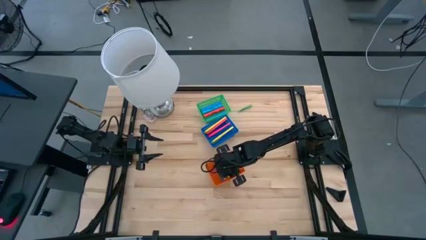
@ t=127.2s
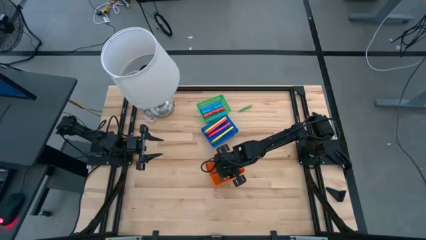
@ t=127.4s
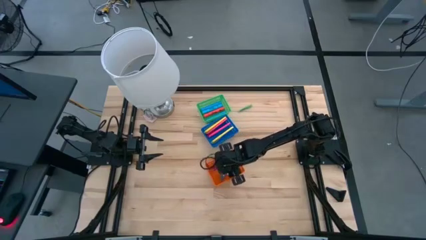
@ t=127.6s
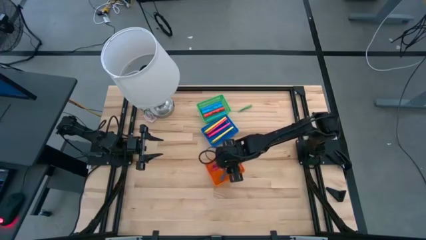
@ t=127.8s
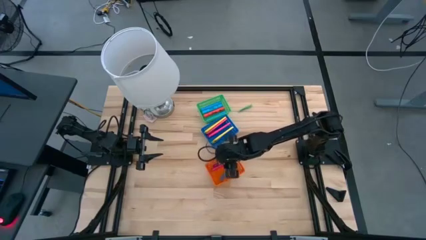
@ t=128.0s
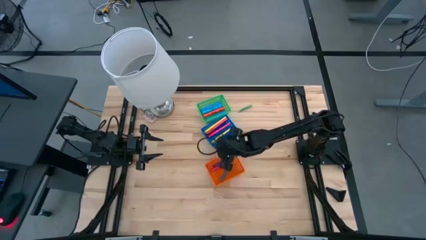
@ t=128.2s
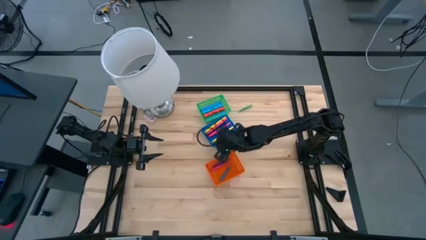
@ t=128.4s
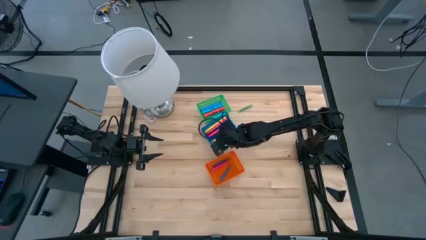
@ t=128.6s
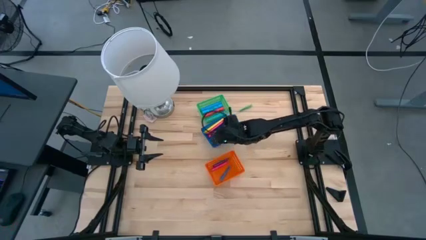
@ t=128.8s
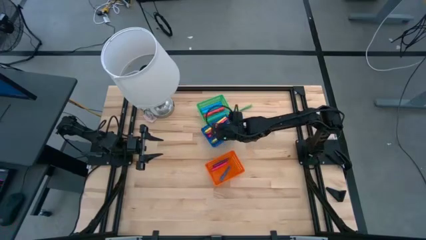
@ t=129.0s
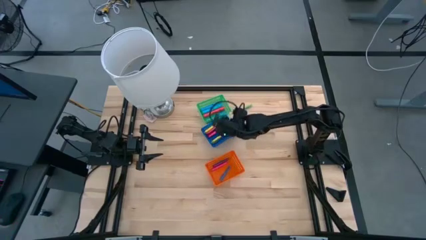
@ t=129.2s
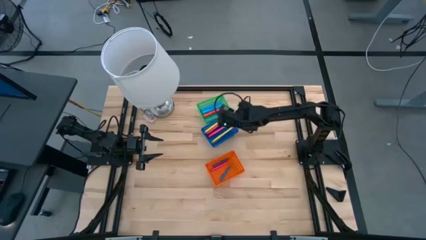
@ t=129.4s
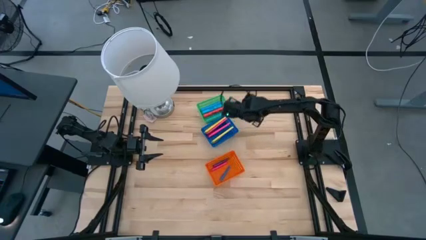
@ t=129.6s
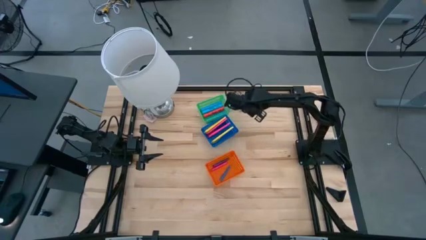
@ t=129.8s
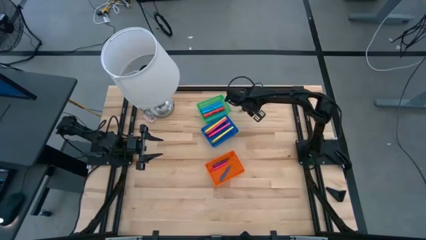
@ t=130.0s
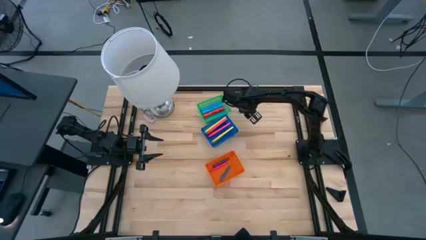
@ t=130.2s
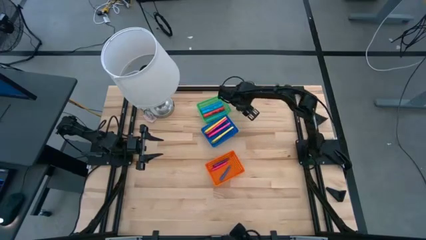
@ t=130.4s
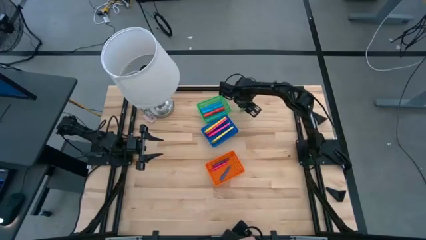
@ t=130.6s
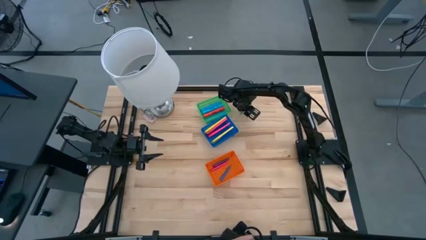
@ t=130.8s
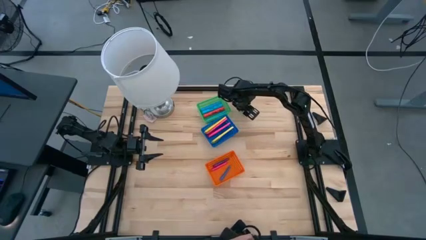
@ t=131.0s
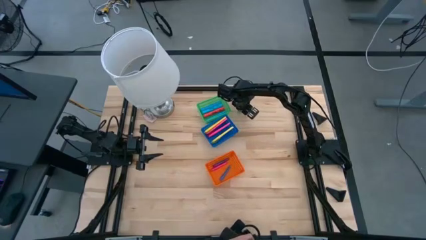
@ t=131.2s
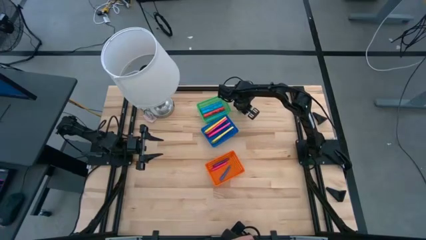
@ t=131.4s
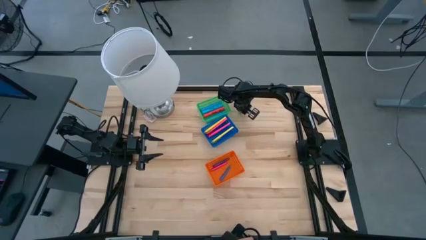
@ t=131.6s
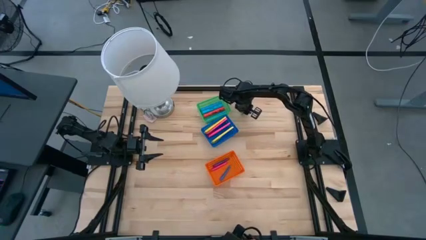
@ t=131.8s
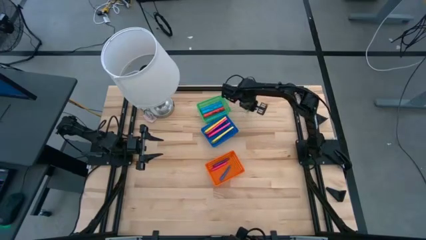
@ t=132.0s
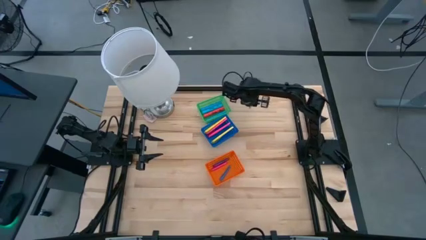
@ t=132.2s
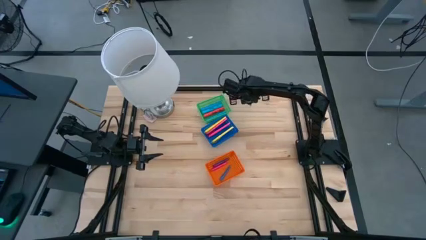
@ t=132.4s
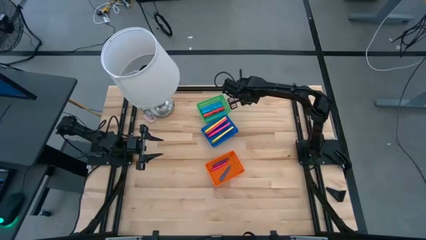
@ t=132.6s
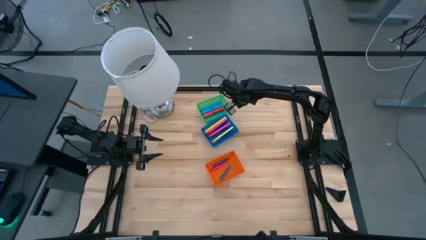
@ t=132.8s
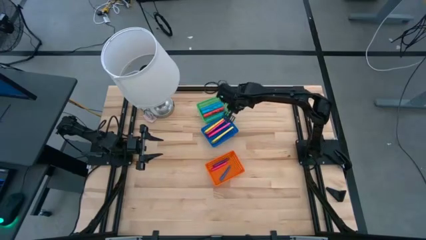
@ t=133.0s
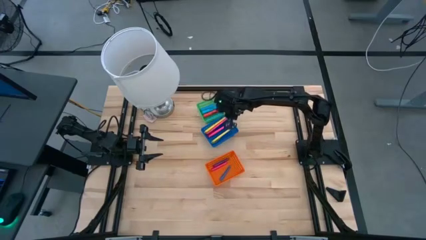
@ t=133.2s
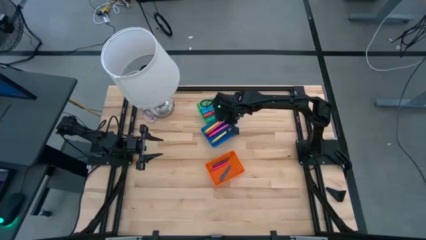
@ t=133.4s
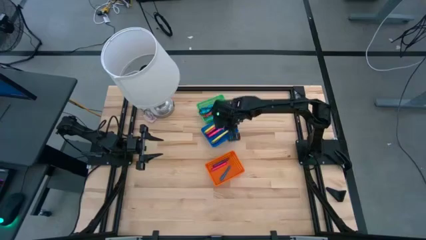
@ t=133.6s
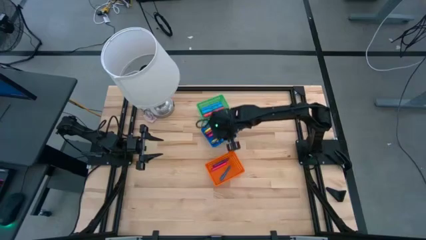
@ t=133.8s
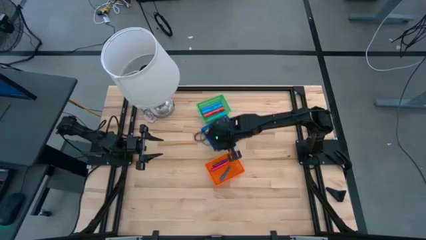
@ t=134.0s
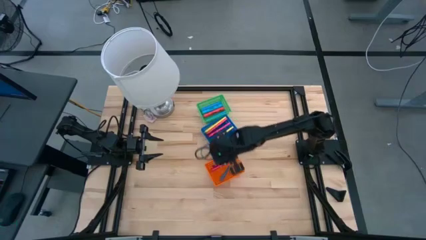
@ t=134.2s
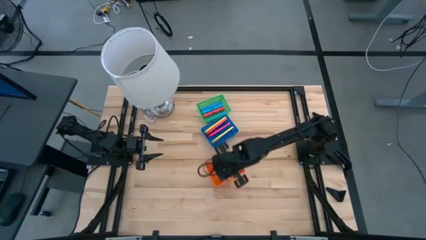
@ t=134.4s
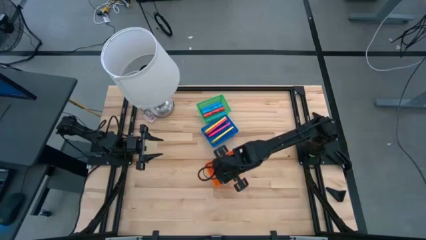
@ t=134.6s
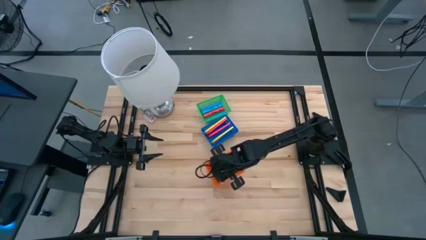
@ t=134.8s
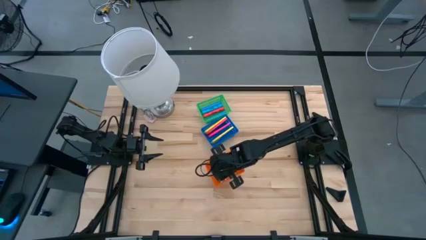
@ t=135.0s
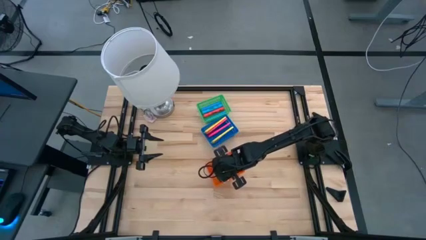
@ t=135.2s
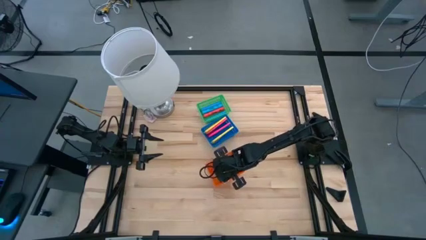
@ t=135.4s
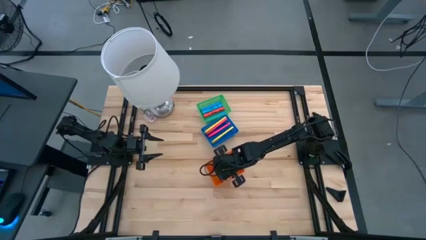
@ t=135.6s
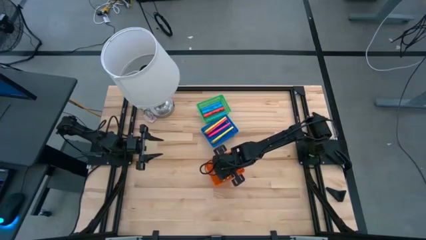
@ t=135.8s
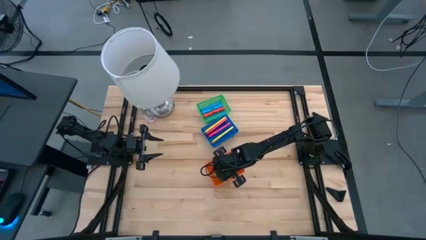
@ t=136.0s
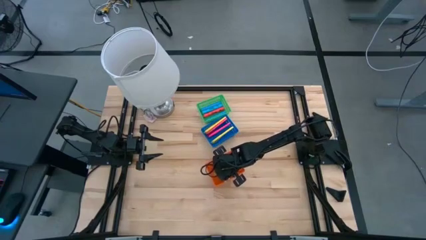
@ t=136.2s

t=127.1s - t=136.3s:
Task: Pick & Place Markers
Put the green marker pen into the orange bin

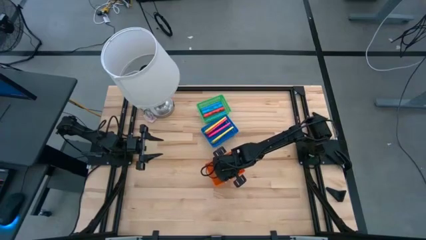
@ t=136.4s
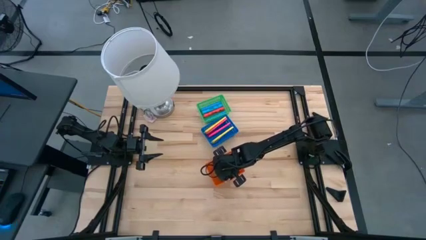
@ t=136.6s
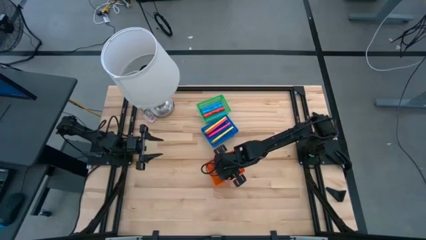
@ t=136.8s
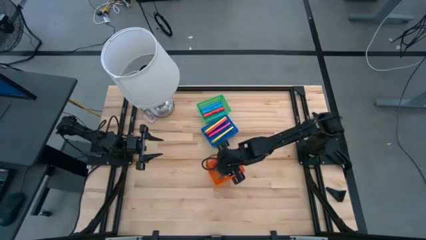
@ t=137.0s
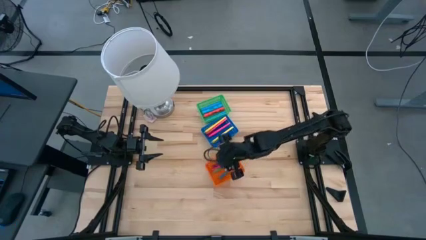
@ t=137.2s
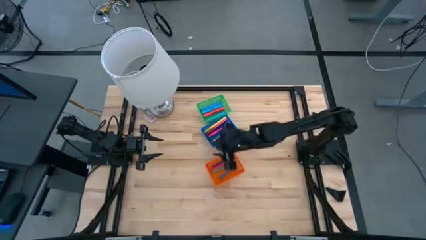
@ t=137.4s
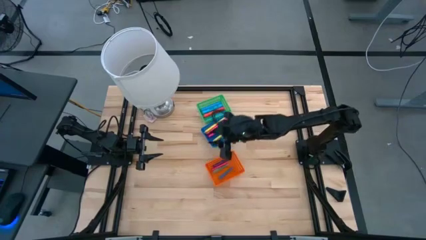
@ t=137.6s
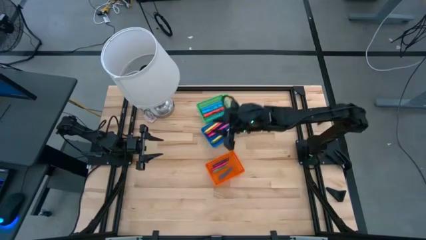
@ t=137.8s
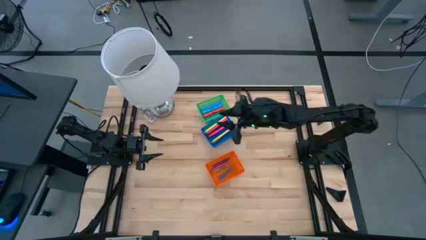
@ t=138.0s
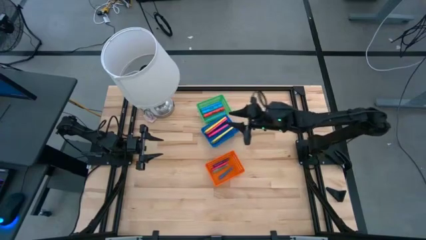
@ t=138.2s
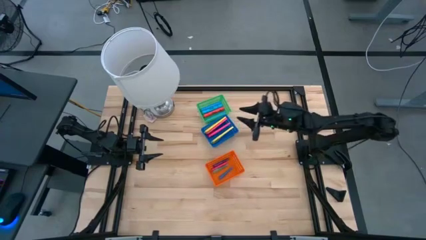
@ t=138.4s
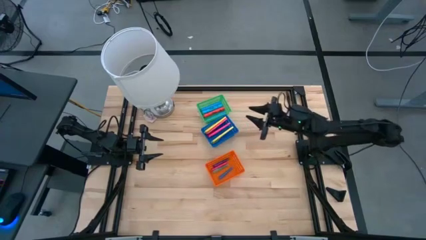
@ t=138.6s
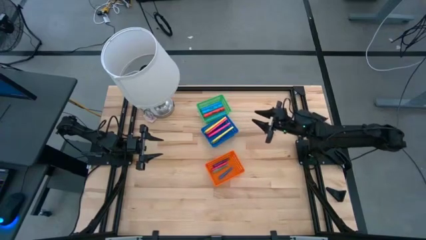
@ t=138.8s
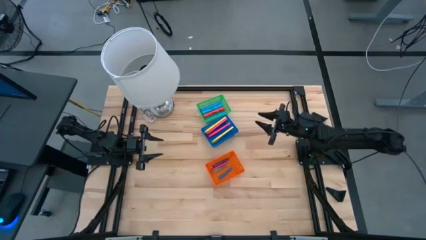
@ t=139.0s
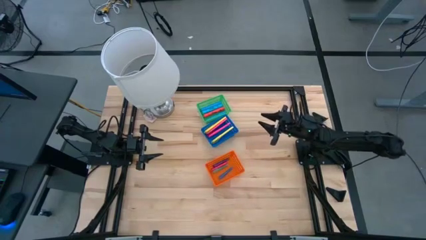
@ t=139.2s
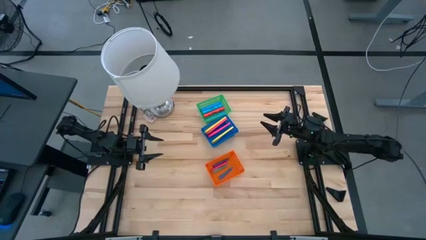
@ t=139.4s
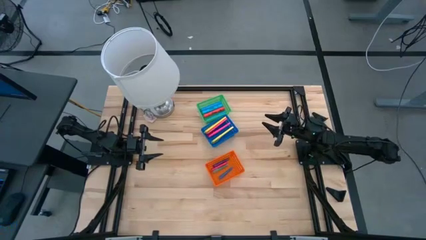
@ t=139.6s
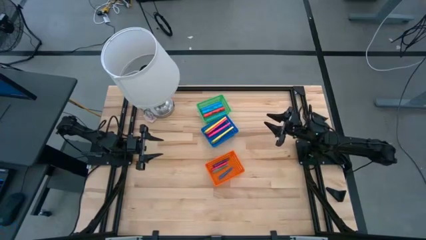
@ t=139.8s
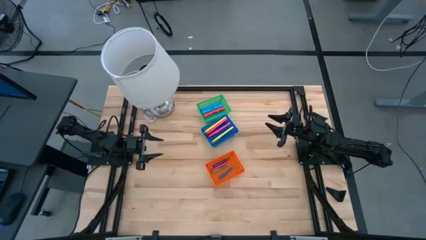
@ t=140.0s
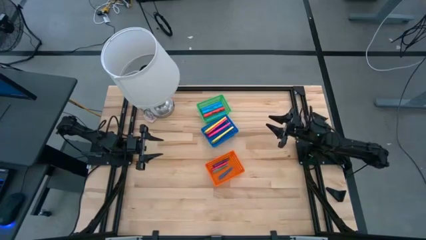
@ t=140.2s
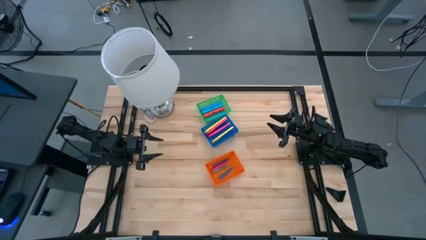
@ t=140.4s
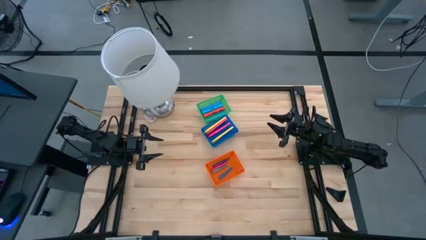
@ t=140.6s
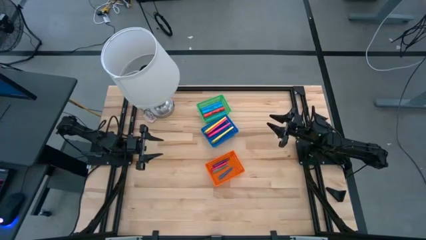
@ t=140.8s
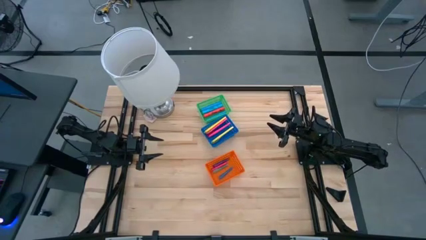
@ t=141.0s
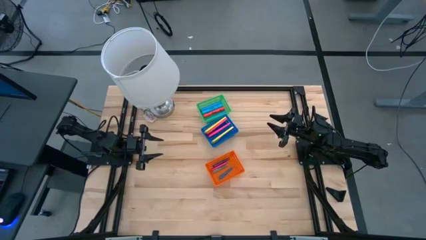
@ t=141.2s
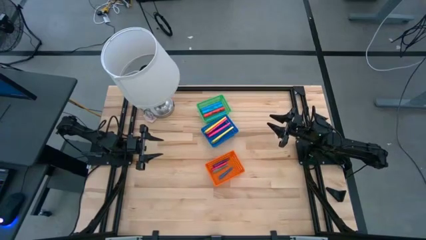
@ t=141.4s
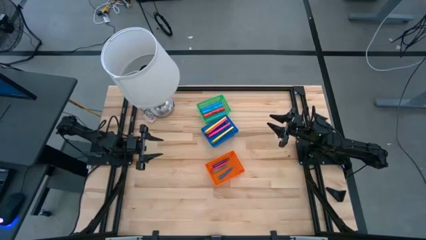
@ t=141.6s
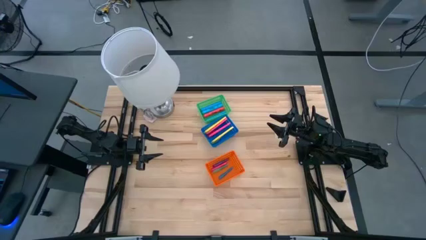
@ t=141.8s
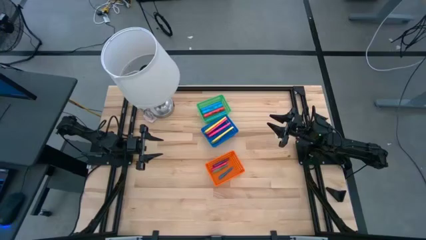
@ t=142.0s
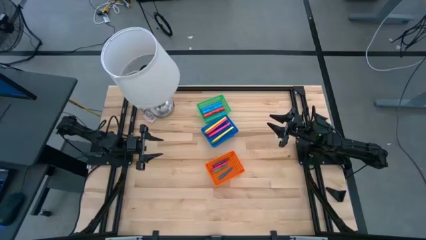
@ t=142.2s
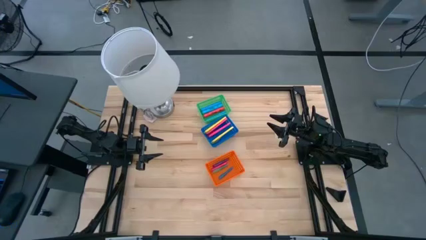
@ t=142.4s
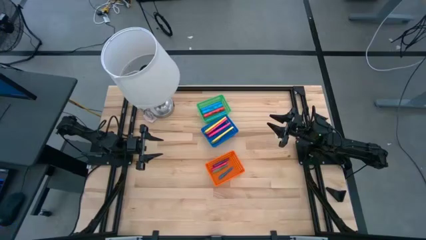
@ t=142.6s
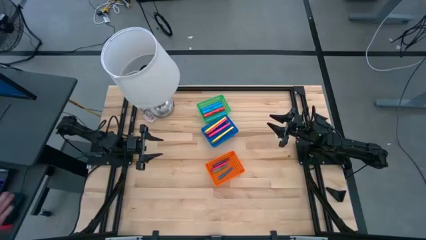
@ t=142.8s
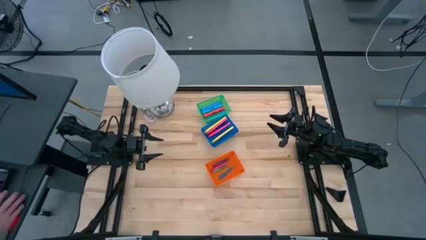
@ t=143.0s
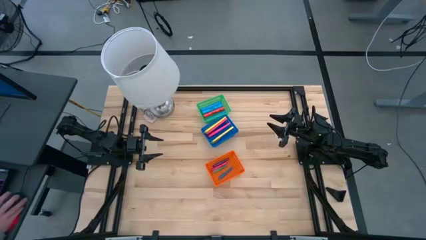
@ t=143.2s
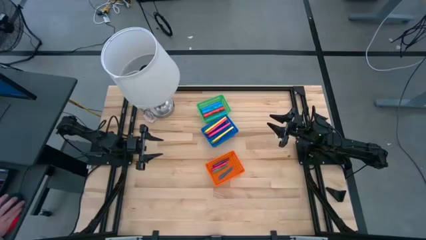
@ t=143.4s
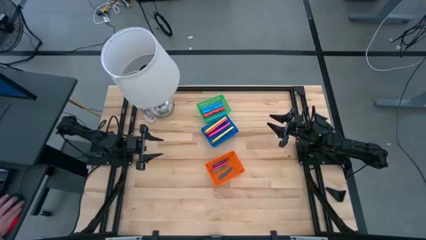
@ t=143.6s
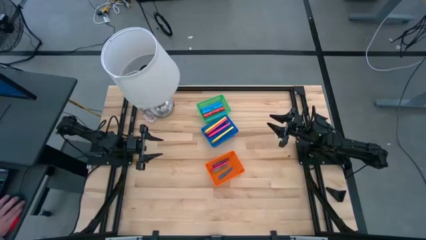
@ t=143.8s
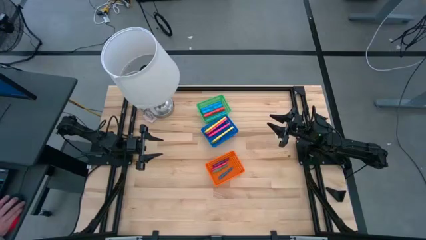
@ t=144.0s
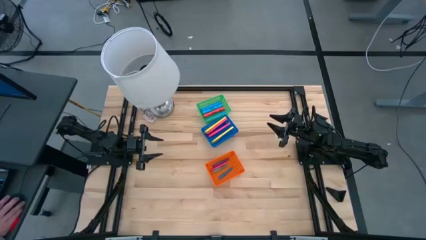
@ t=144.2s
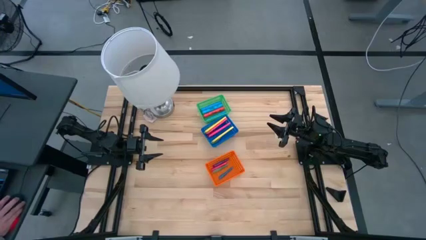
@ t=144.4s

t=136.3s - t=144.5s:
Return to Home Position
